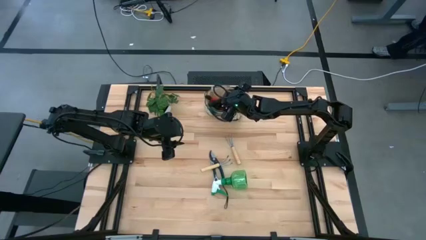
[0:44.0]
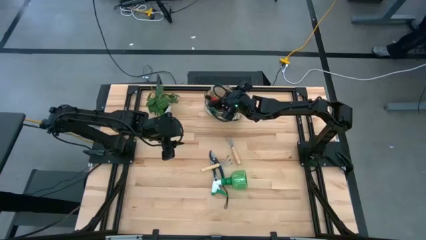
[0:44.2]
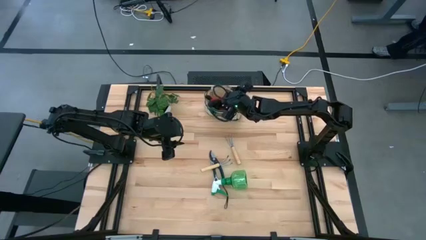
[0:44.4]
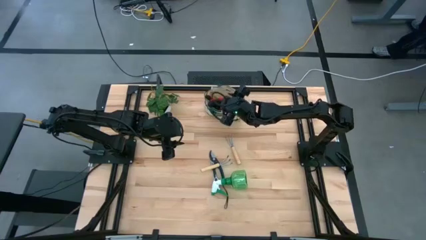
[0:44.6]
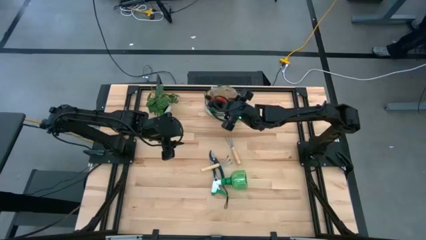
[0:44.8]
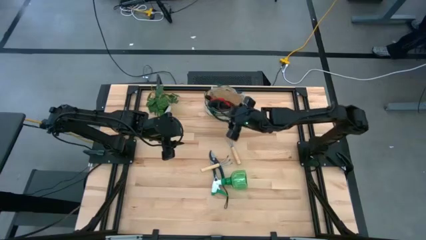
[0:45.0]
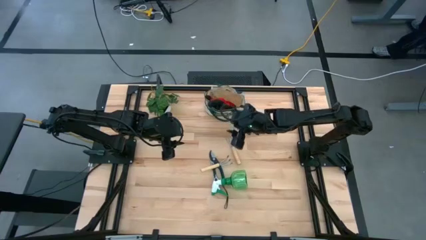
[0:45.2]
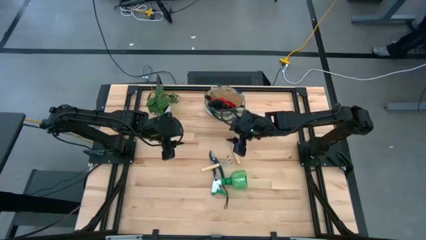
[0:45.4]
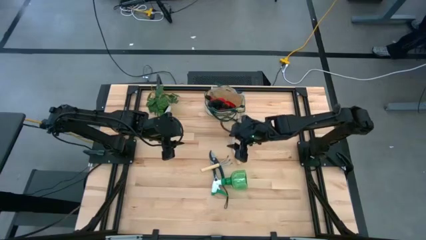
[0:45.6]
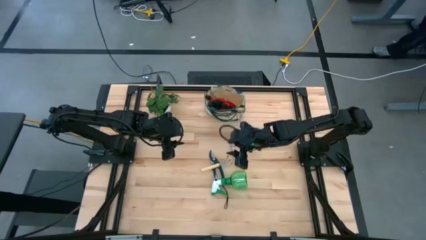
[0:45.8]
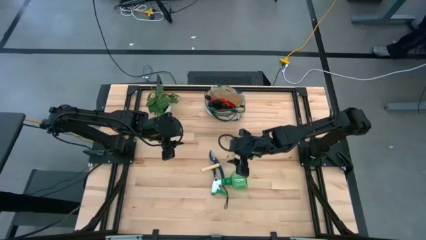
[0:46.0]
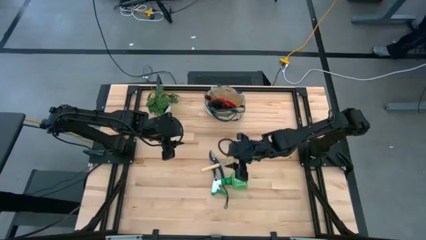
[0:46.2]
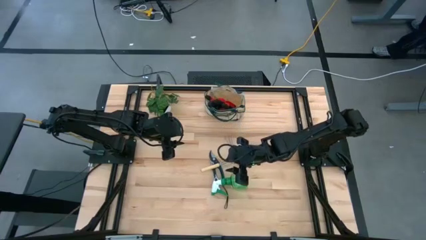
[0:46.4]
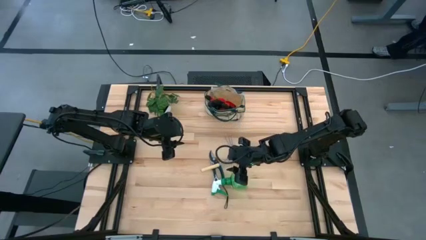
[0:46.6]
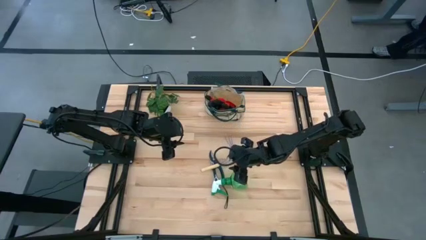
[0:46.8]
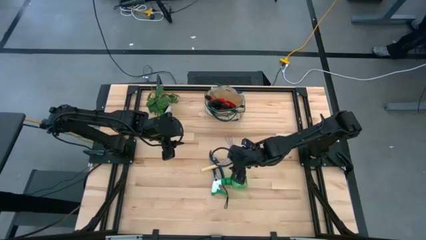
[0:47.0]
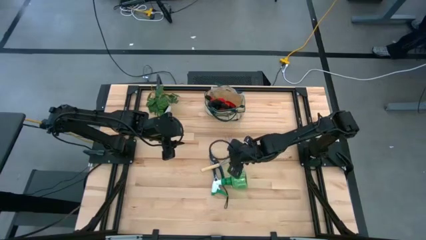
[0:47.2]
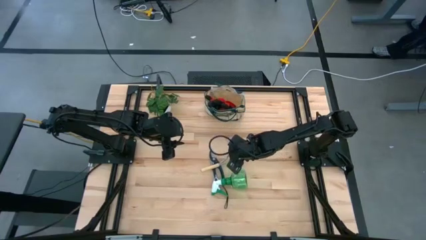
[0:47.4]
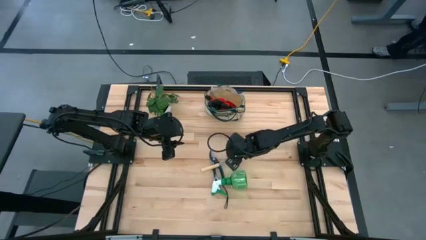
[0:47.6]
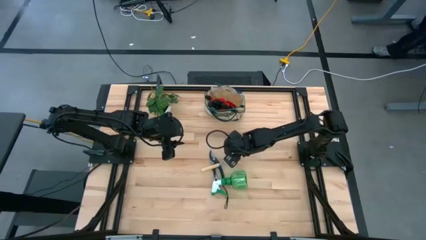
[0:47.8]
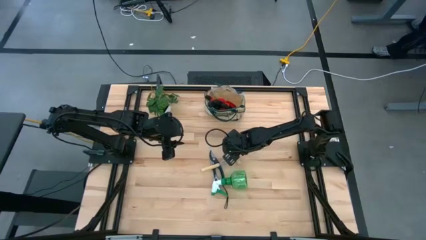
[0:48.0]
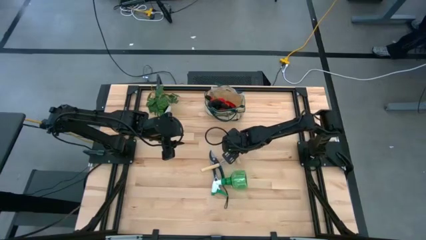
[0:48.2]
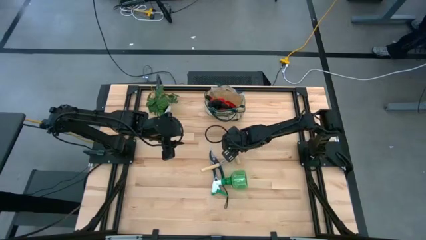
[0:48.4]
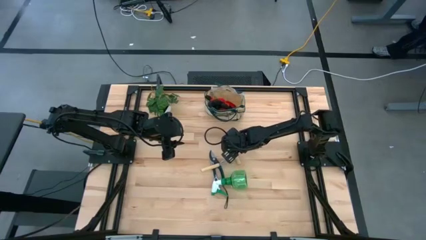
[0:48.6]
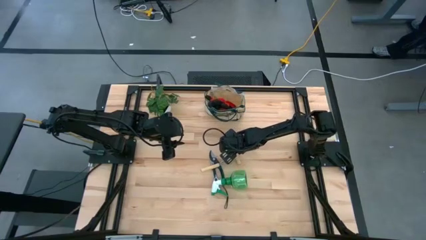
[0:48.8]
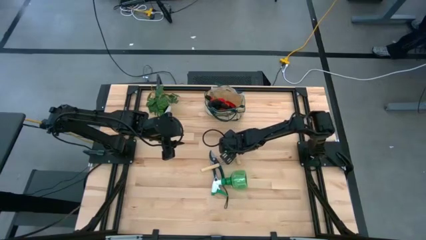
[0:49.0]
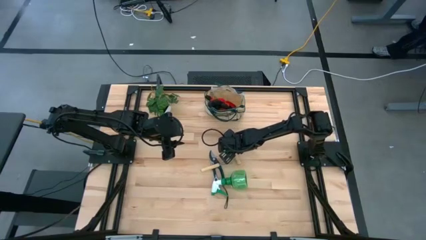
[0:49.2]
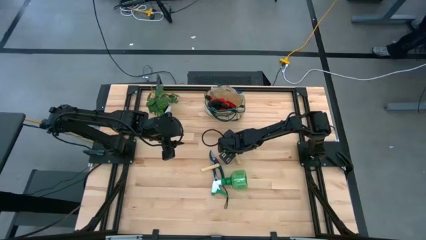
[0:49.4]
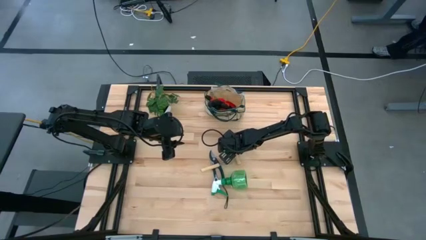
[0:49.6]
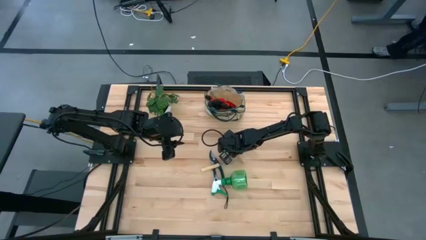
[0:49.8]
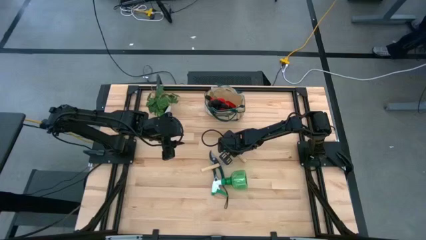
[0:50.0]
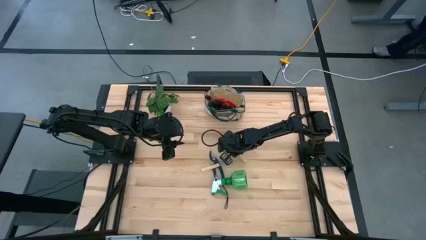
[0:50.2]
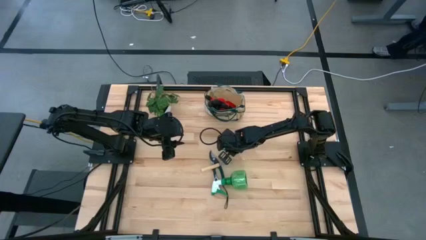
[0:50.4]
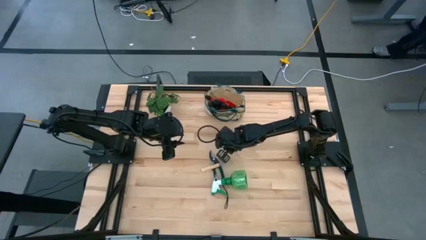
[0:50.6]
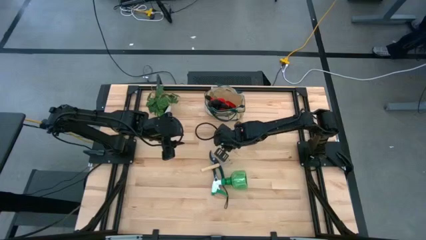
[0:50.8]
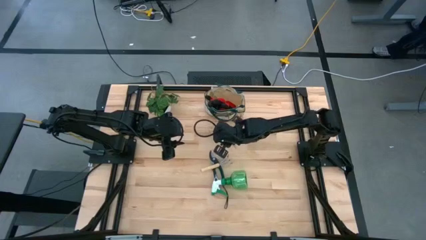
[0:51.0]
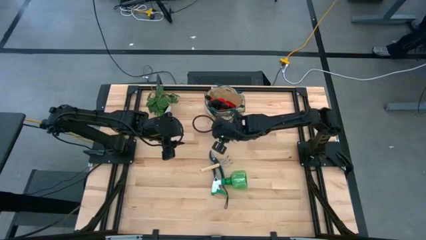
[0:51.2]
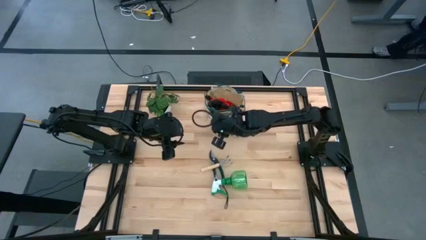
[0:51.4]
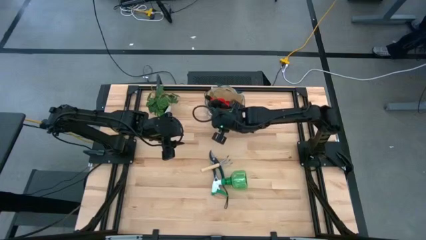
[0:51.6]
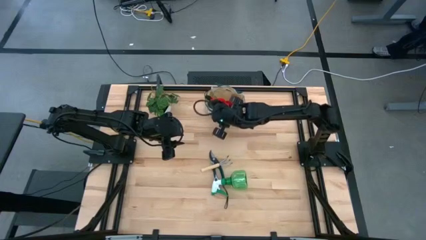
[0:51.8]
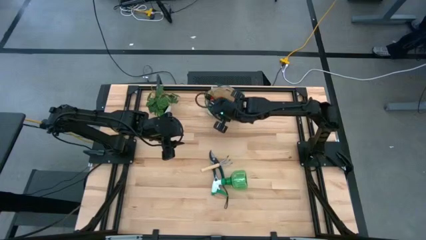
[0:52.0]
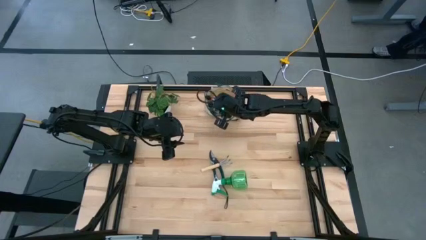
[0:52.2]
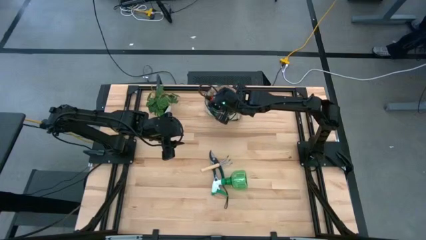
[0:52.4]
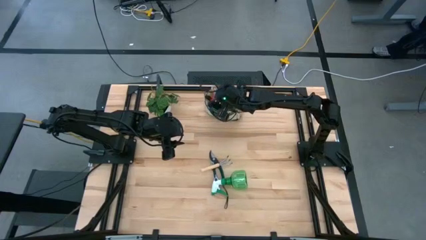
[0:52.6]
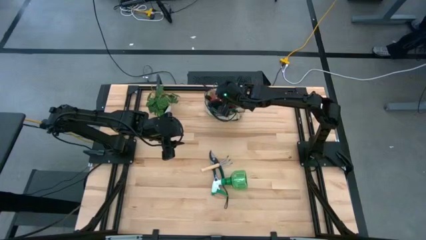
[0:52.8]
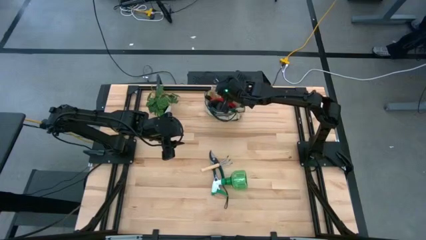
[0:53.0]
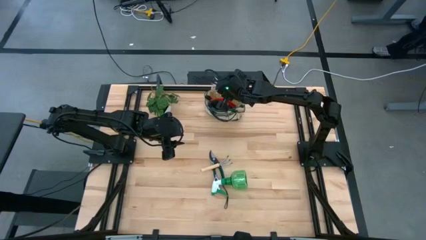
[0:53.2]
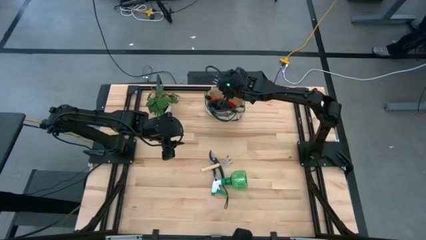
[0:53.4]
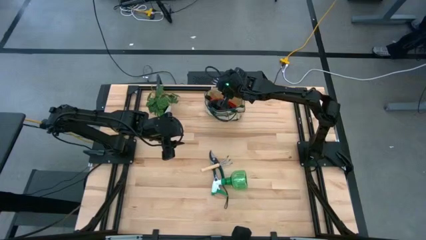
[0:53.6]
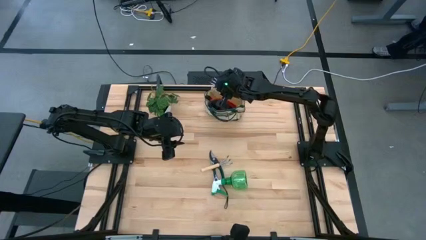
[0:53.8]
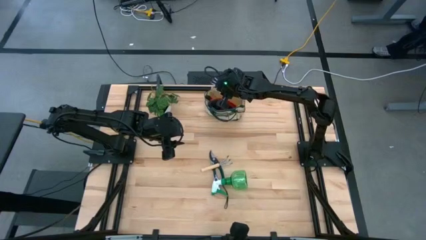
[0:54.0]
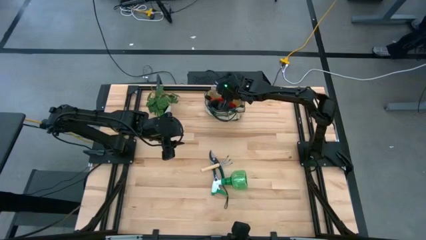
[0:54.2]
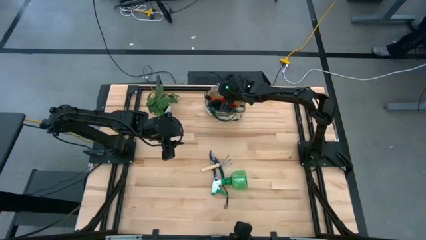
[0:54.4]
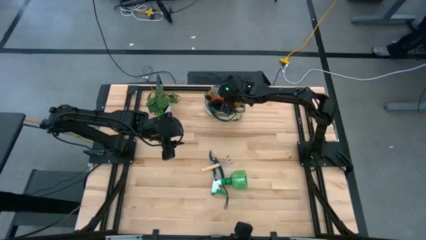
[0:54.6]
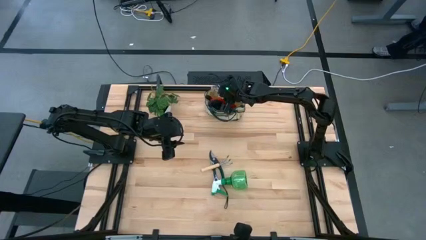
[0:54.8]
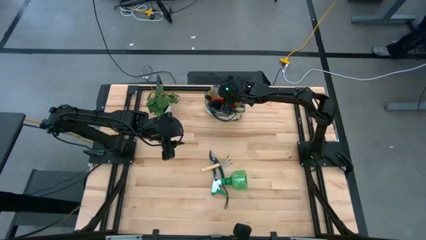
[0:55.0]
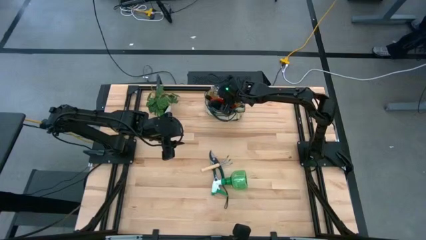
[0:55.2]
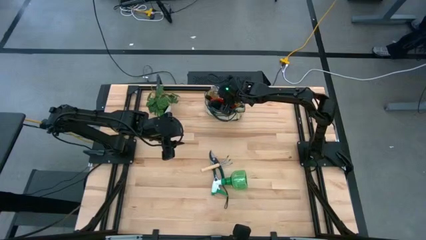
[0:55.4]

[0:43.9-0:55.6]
Task: Pick & Place Garden tools in Gardening bag
Put the right brown hand rake into the gardening bag

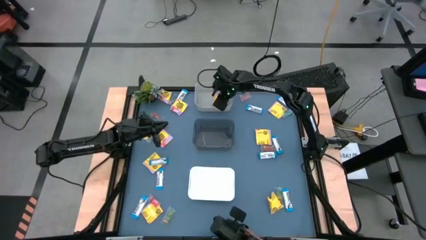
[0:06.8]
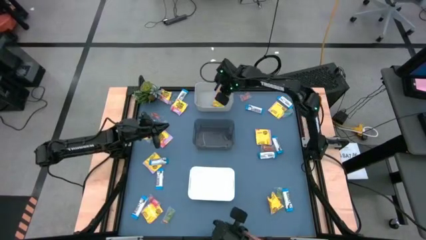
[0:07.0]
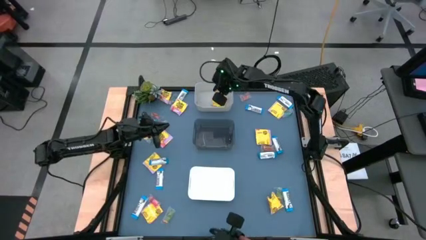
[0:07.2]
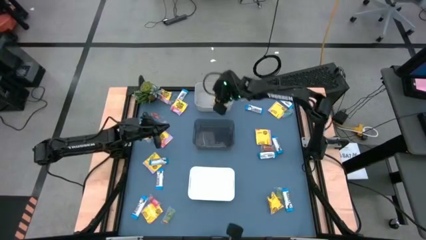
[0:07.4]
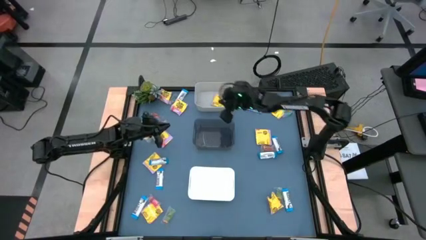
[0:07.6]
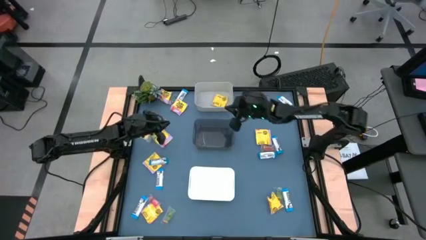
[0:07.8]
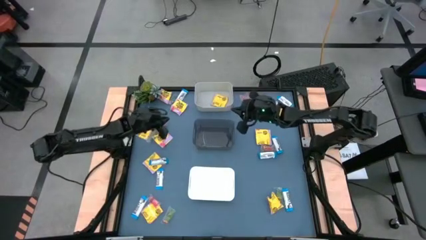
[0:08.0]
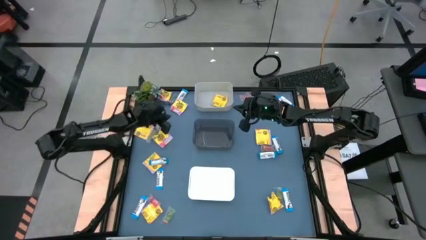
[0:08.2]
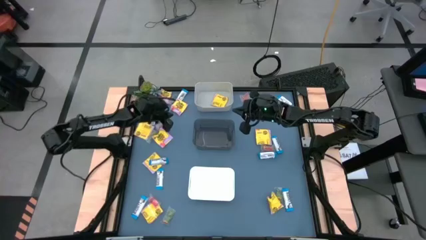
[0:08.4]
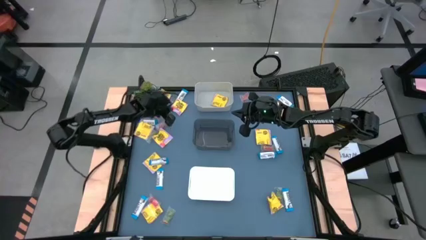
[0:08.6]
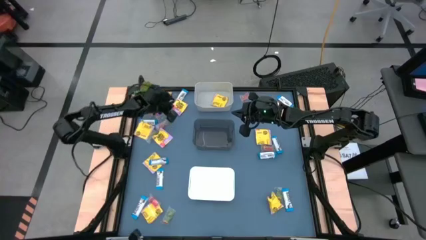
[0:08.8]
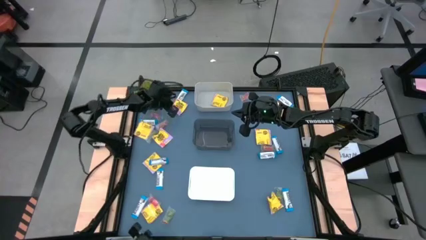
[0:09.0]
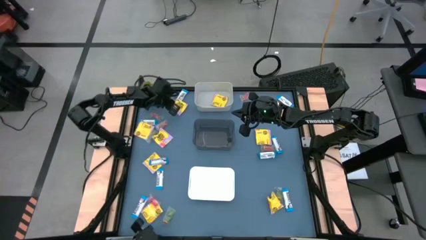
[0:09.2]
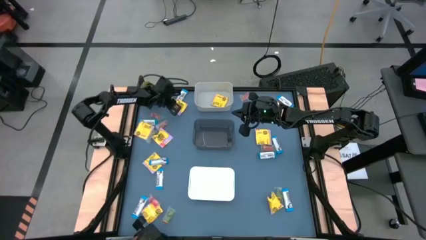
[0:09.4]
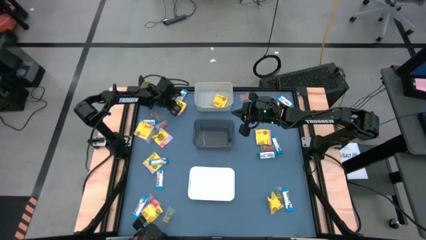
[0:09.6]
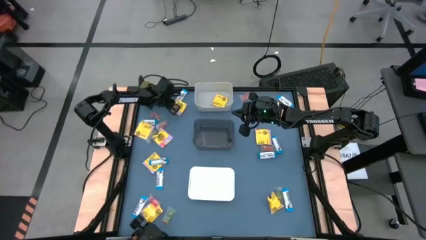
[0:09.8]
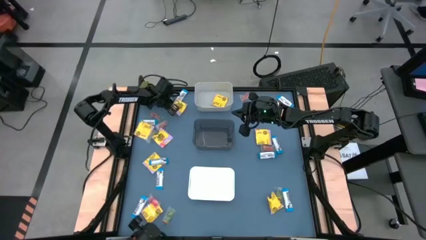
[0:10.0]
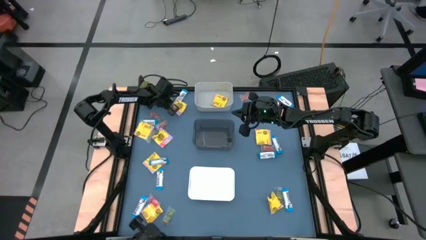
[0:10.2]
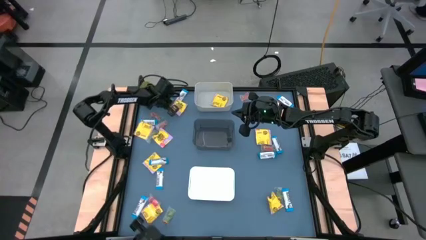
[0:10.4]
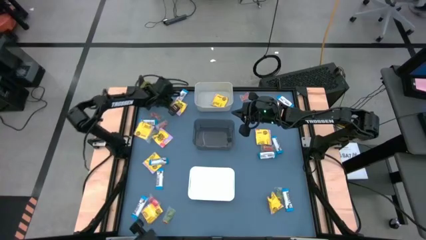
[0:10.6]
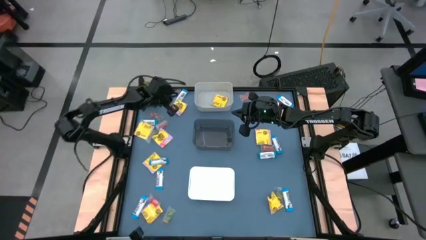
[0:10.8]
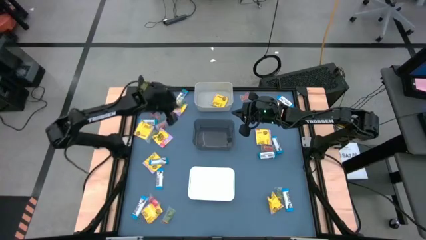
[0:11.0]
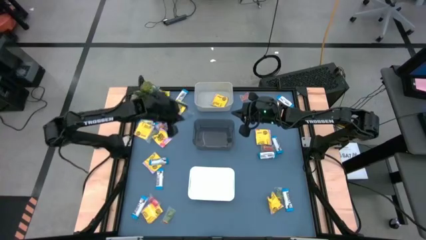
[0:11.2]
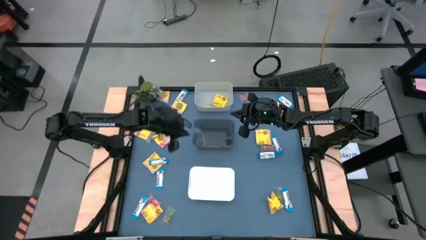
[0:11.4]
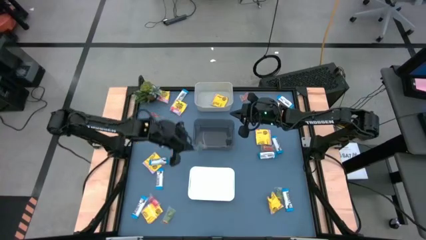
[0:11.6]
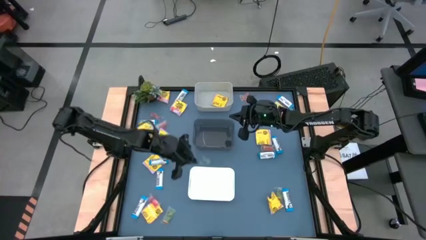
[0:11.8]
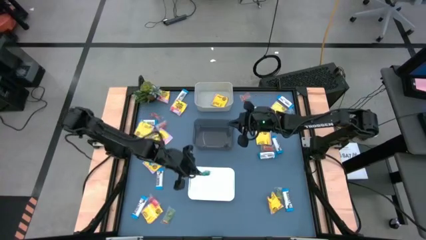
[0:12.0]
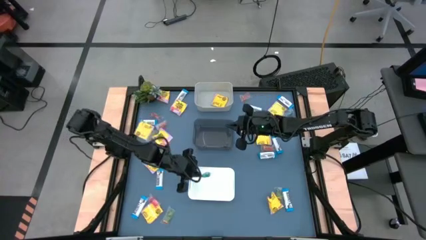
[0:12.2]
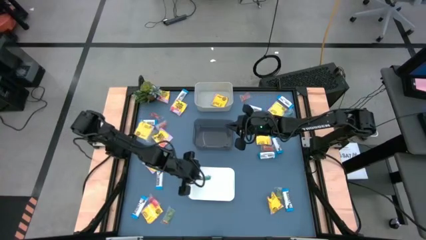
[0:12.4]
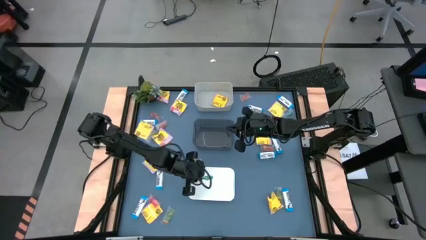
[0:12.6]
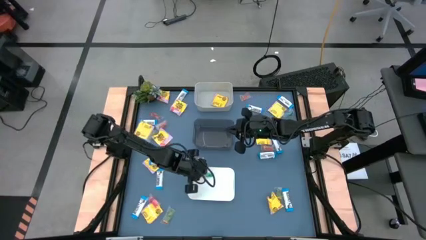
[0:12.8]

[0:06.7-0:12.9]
Task: Sort candy
Put the green gummy candy into the white bin
